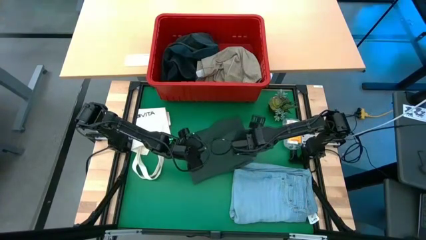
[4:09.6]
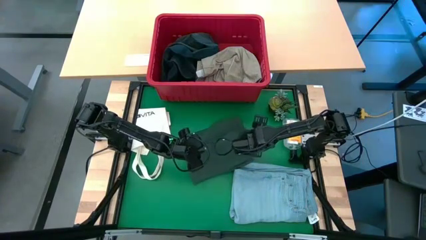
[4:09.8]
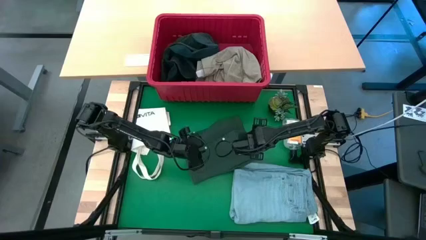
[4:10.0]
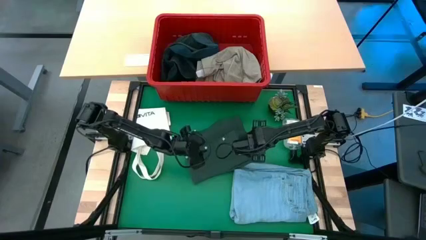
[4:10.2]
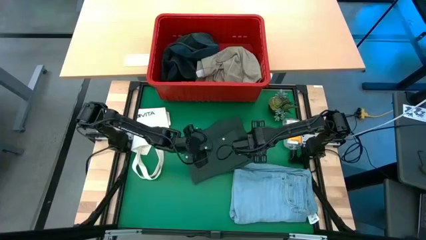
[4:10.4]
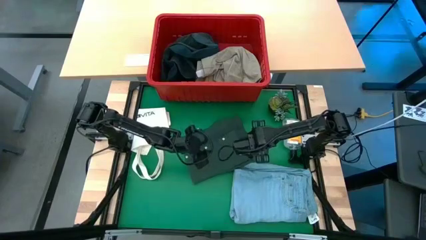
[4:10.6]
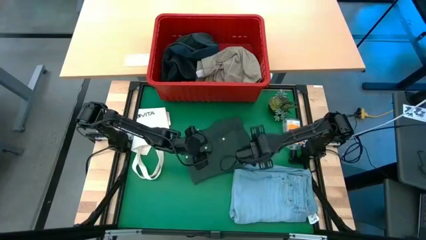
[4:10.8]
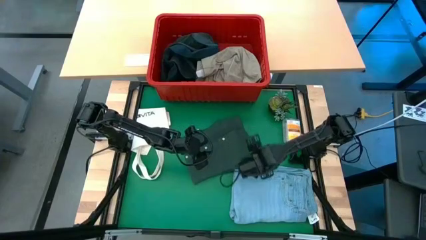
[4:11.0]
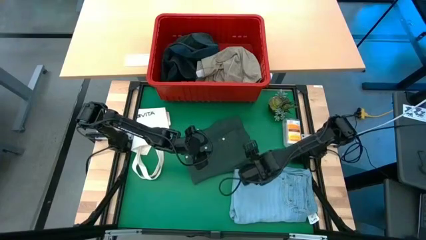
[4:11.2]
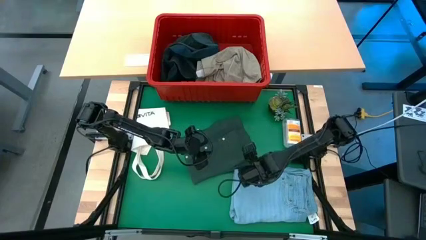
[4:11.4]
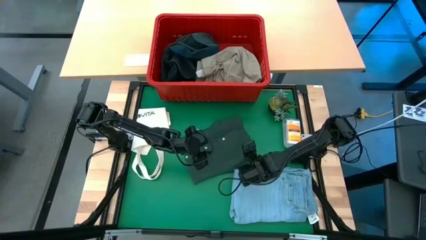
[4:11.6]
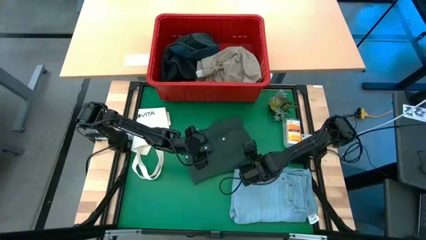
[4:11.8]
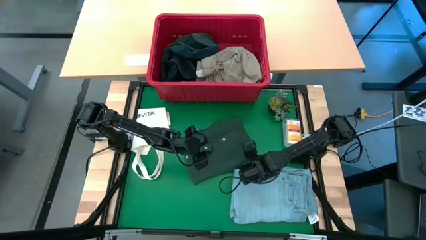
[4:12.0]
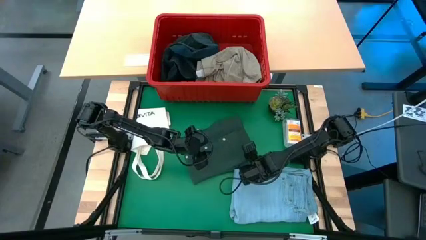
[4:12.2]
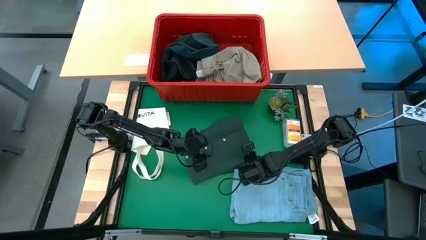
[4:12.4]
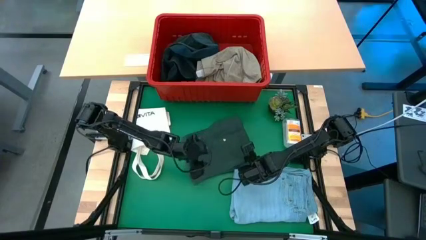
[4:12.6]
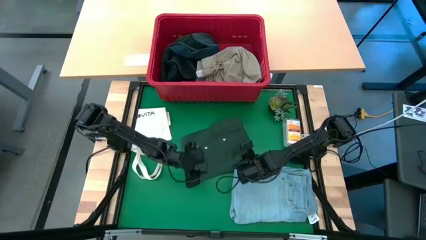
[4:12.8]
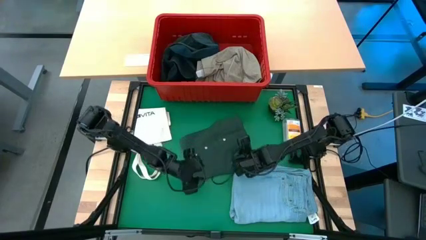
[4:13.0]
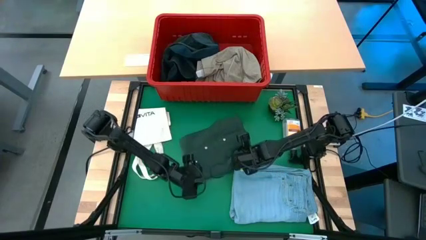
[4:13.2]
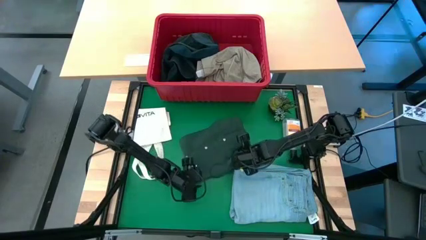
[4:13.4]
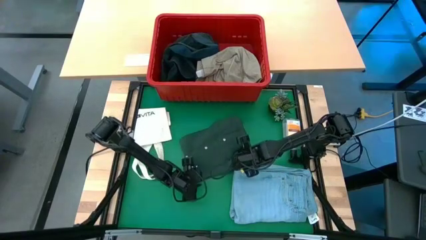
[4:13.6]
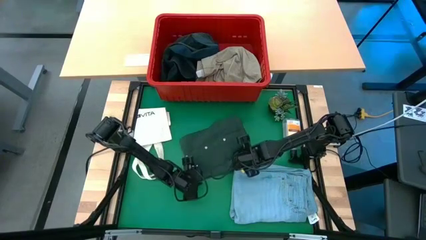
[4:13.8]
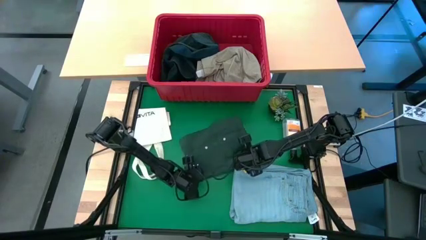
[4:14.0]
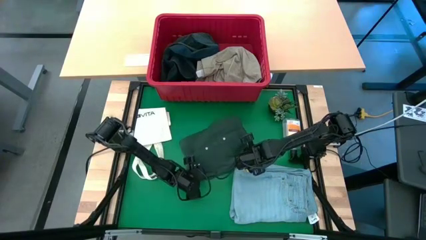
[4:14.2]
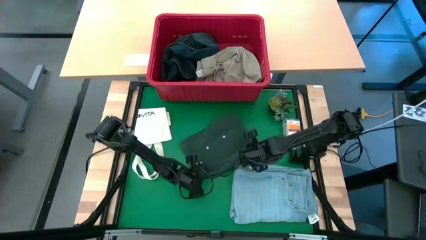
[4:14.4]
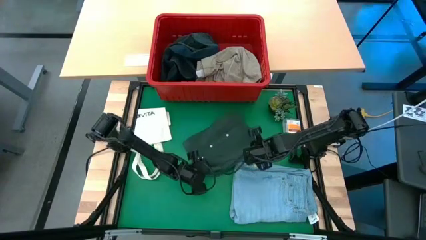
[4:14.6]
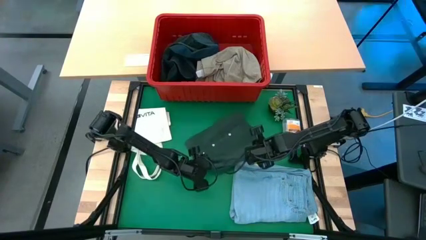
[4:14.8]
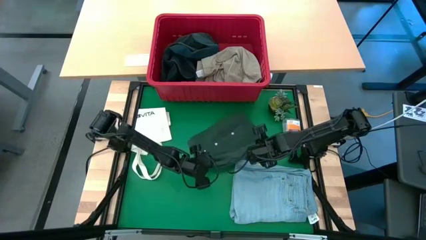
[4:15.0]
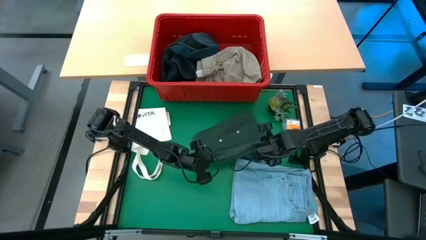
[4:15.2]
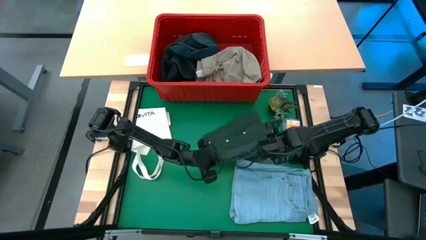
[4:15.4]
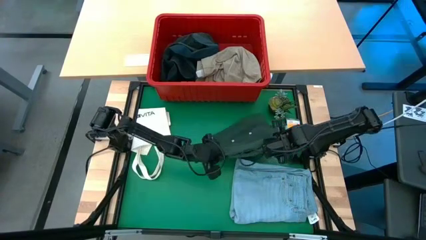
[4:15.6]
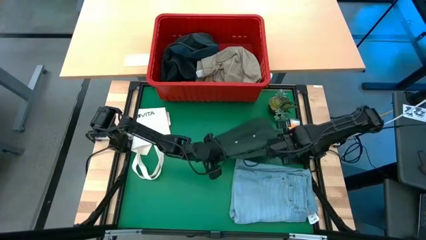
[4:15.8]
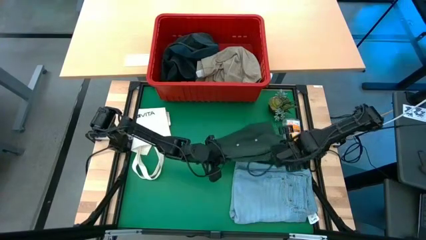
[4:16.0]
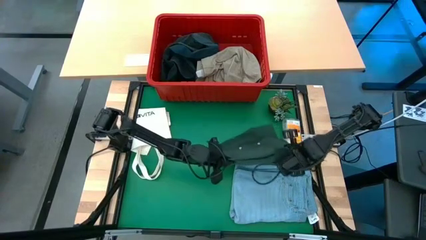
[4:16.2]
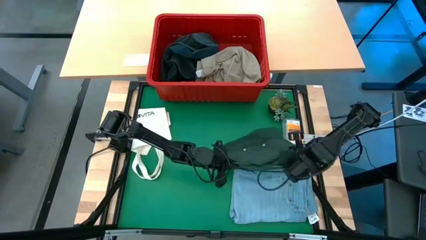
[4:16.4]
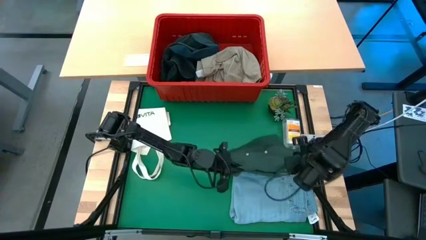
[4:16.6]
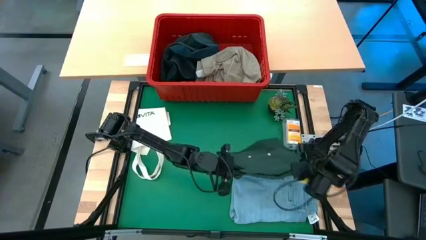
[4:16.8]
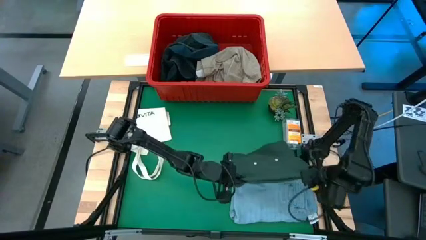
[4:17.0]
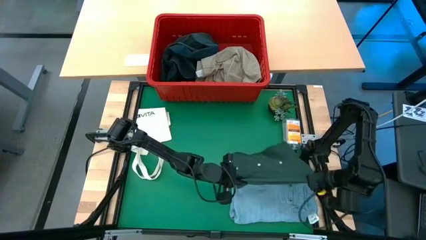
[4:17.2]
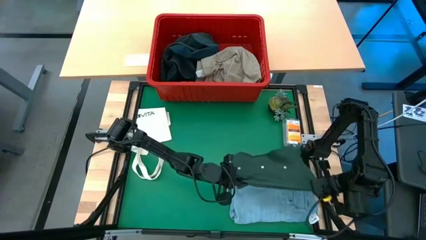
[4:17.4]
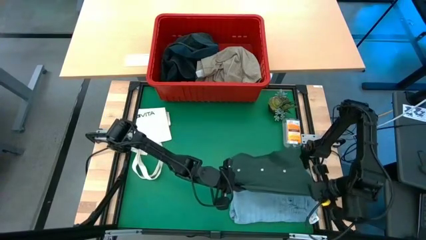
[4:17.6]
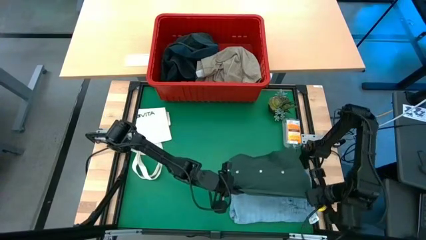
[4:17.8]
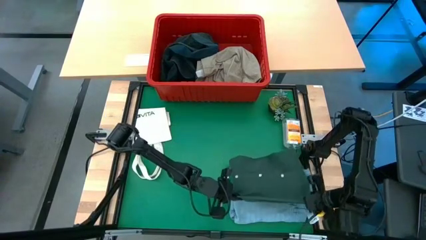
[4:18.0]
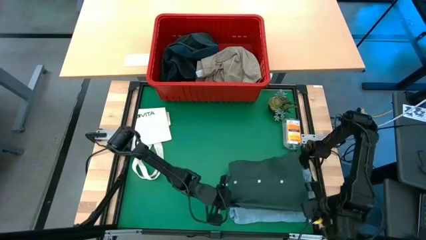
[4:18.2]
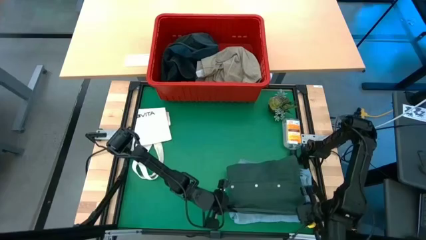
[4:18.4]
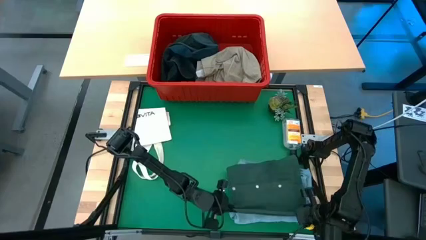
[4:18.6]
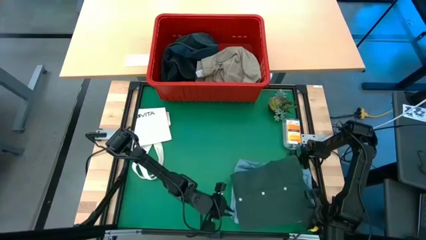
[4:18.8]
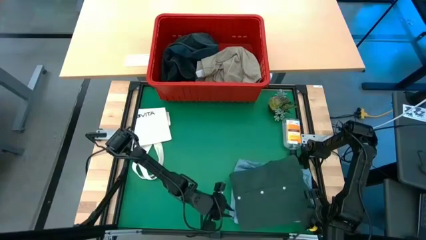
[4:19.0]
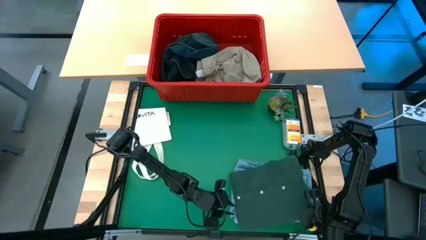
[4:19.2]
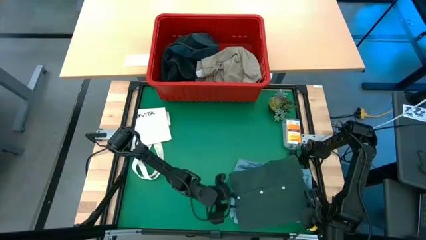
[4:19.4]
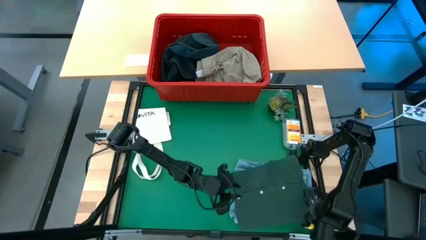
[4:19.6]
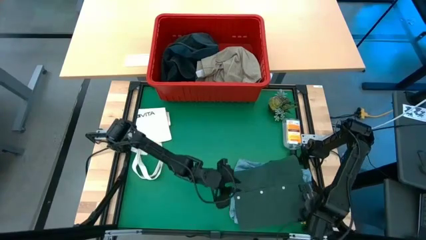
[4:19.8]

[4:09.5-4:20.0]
Task: Fold Laundry from Bin
Stack the green shirt on top of the light blue jeans

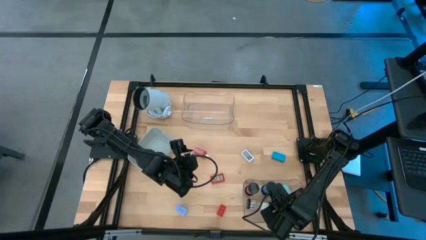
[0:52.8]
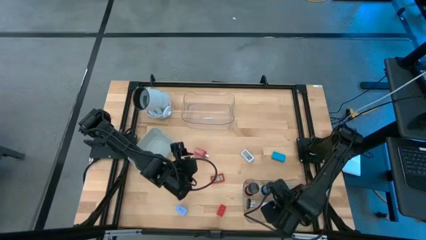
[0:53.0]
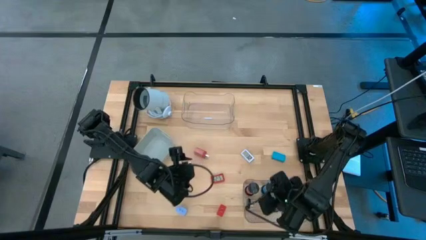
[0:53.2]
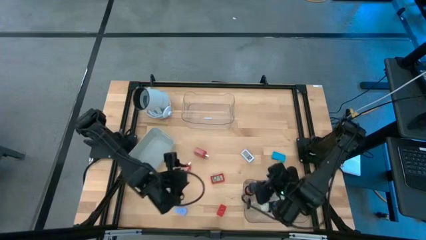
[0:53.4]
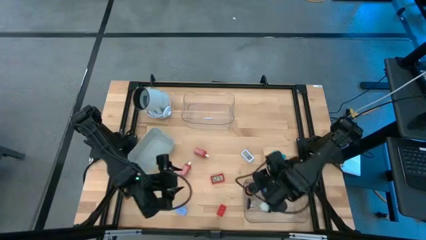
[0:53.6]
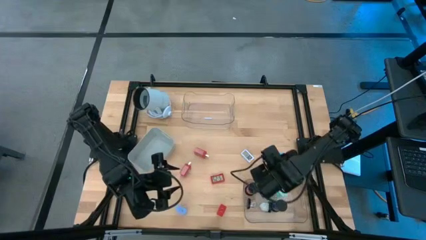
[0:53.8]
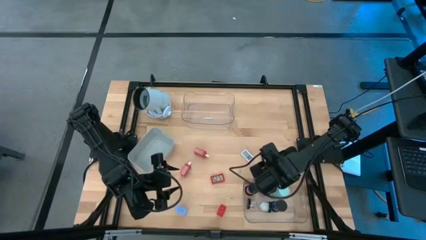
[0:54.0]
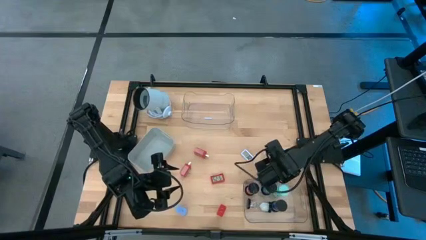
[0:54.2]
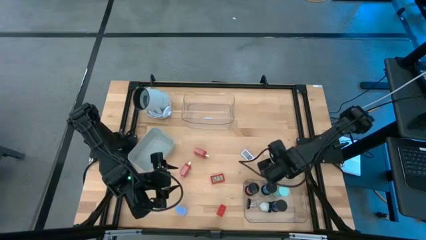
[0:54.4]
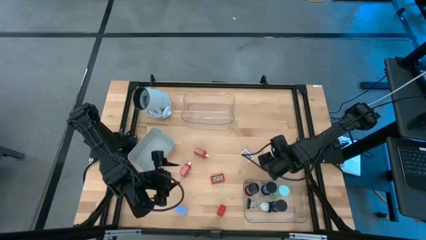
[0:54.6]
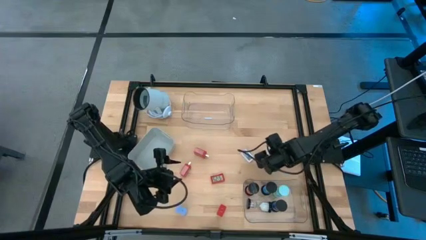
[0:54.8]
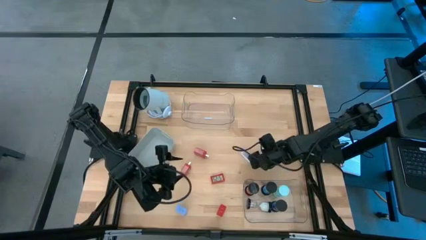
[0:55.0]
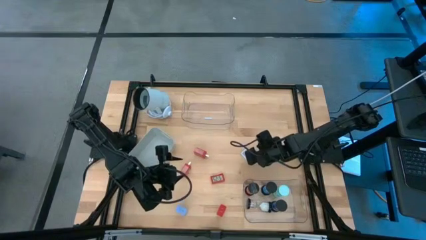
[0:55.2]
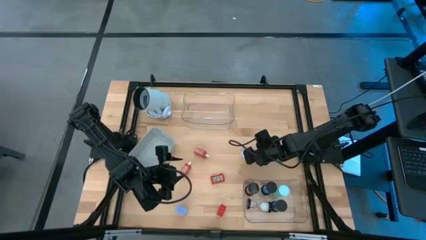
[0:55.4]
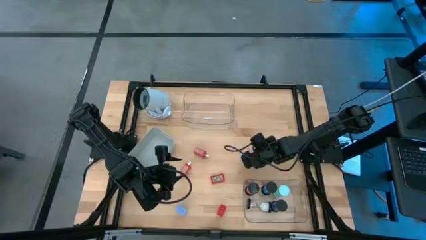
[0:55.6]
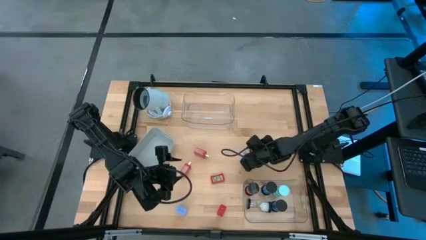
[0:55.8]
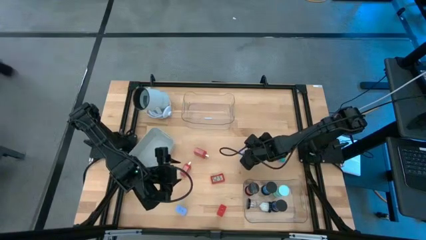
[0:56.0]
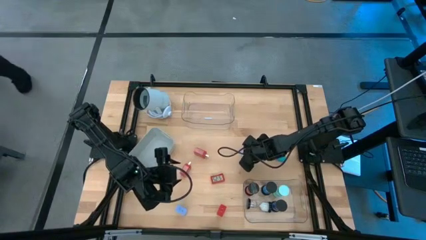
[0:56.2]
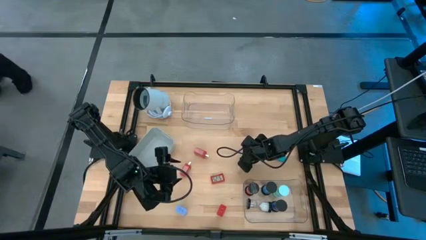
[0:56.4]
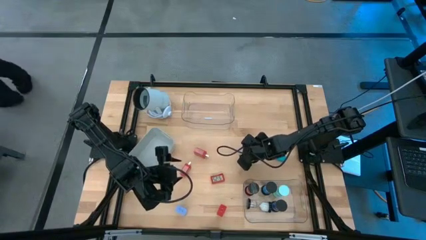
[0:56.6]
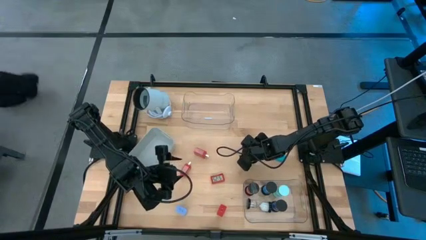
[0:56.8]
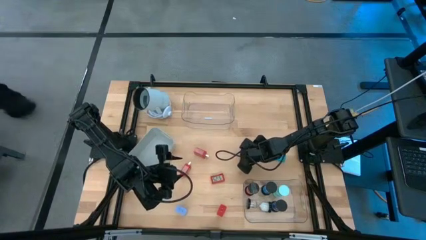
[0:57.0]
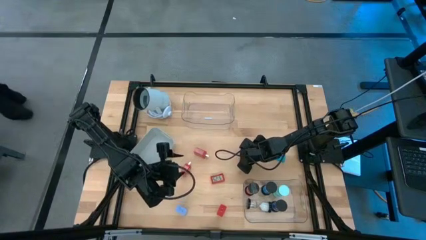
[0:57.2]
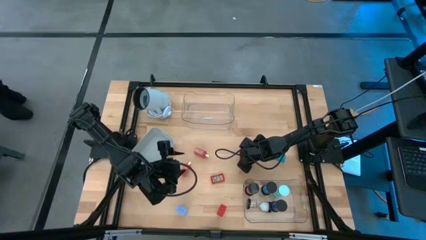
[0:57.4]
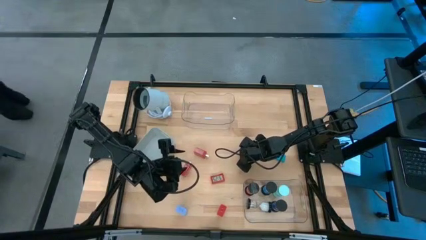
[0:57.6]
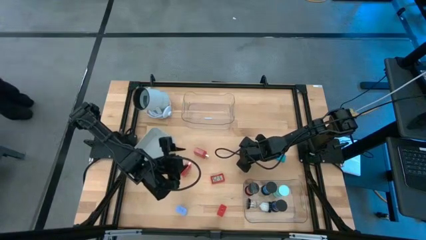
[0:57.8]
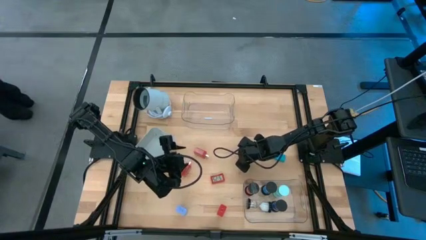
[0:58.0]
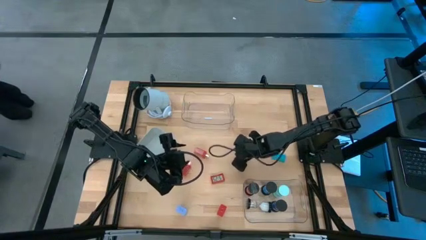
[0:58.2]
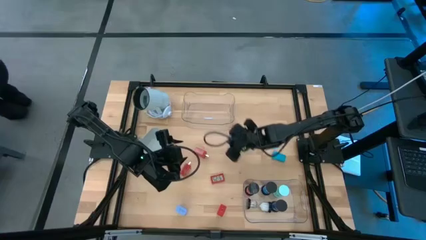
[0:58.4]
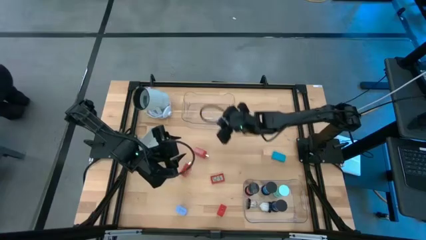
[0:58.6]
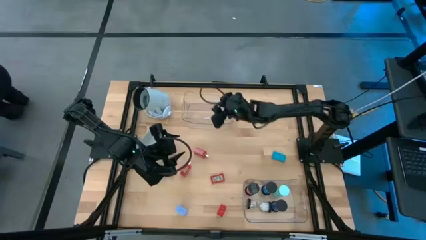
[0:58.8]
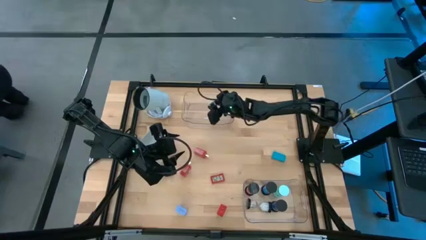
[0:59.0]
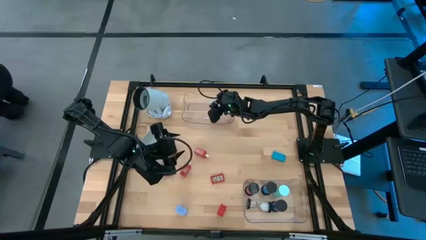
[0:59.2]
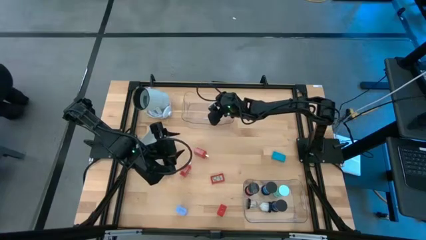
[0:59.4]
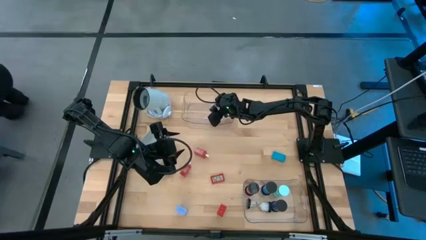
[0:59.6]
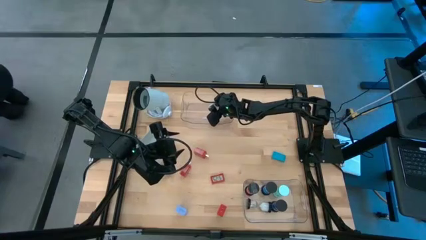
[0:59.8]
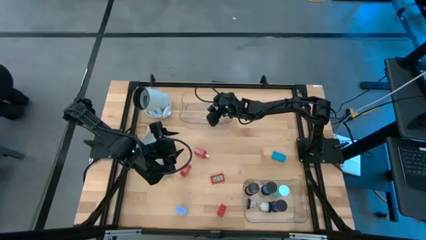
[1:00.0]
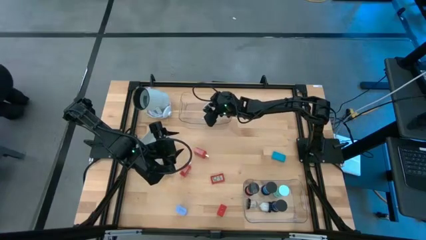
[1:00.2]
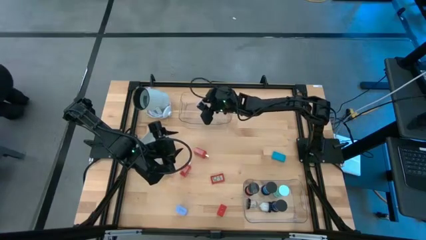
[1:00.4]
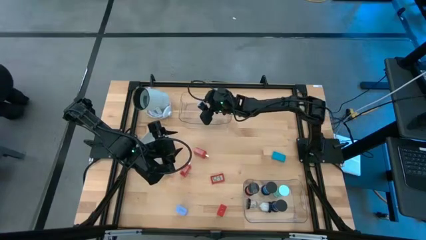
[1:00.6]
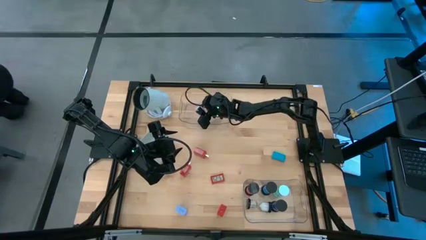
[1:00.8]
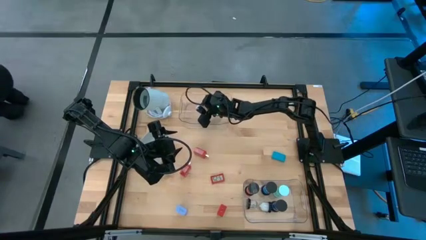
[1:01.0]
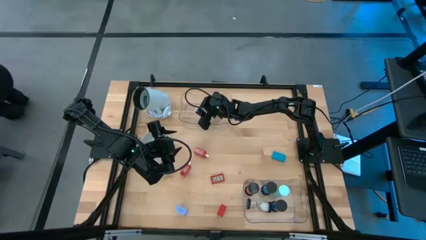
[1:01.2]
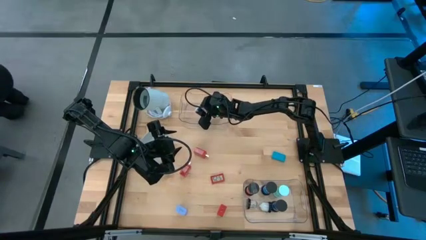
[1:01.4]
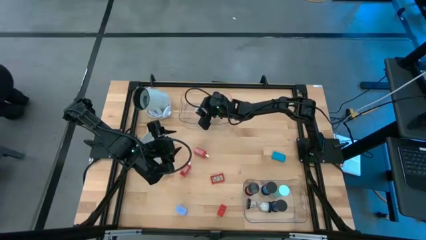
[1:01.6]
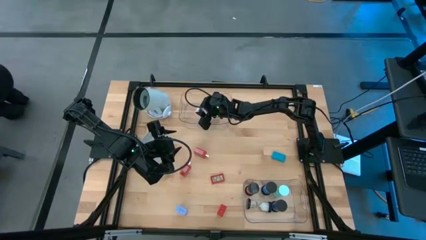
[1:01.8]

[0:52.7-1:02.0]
Task: Pick & Place Office items
Put the white digital clock into the top transparent bin
